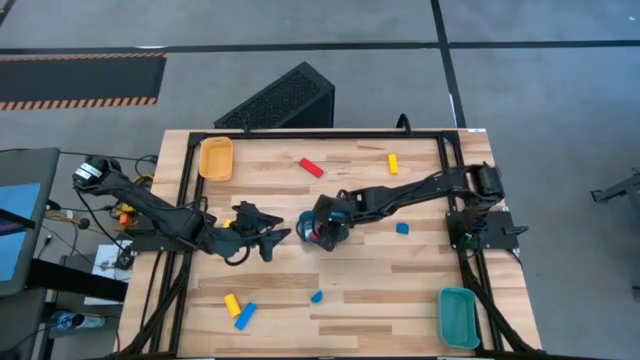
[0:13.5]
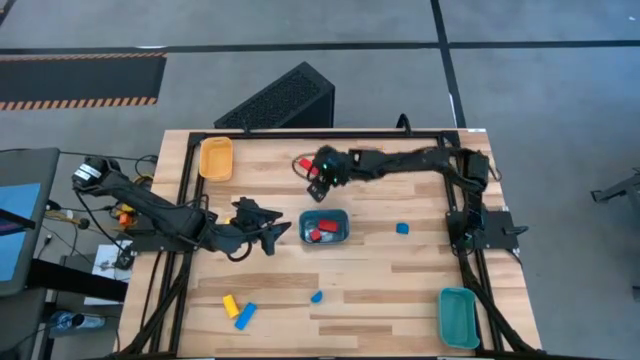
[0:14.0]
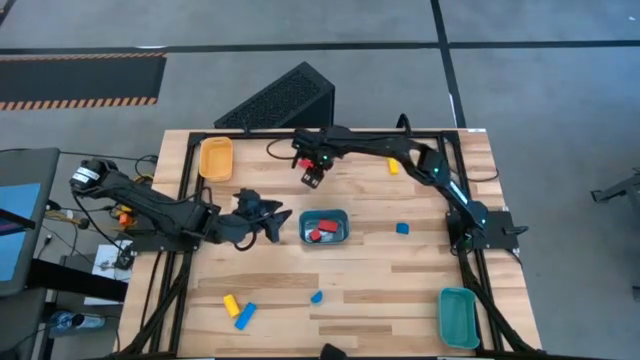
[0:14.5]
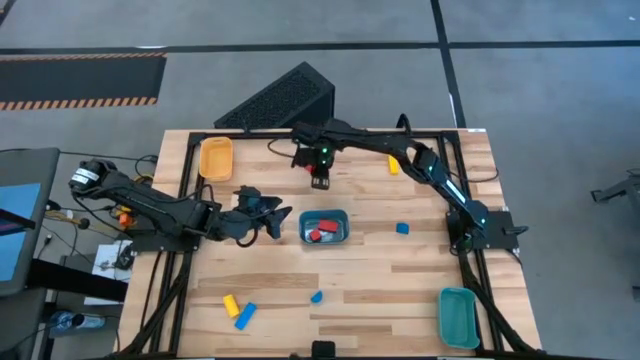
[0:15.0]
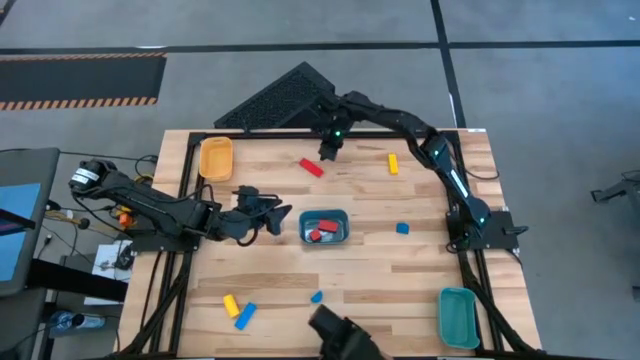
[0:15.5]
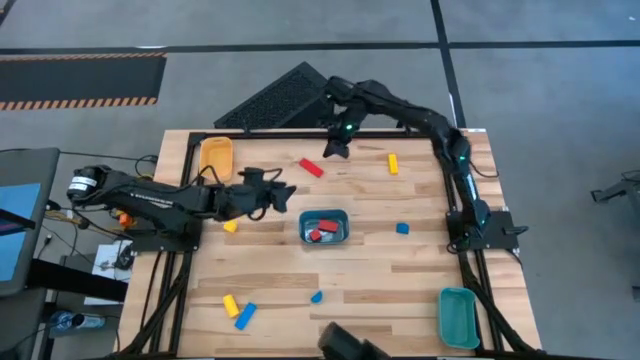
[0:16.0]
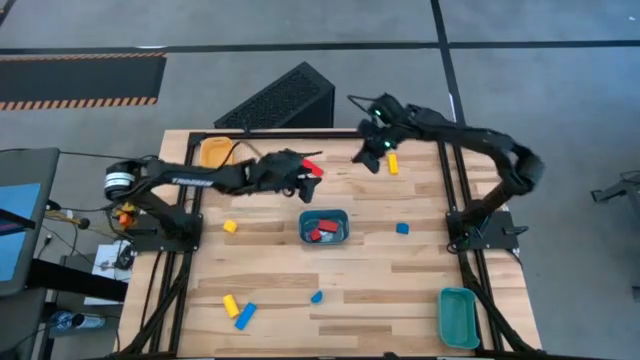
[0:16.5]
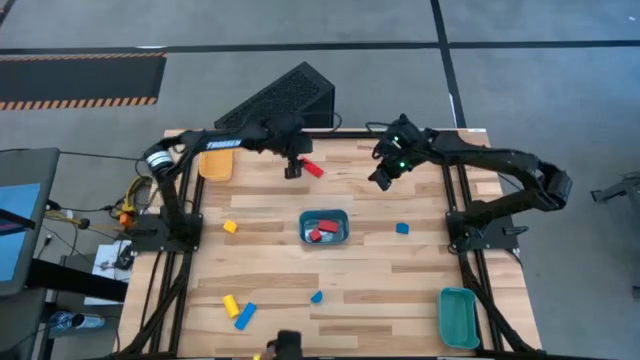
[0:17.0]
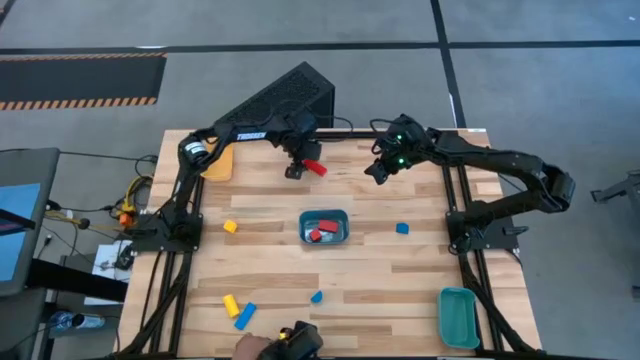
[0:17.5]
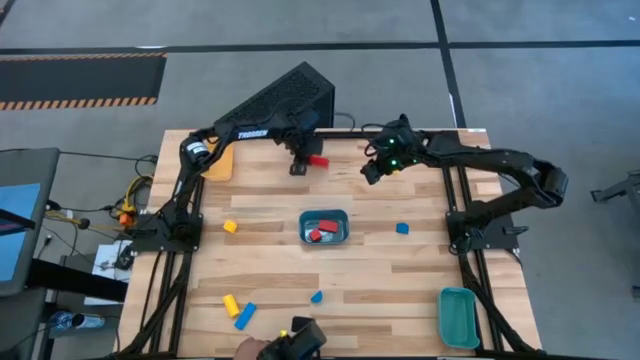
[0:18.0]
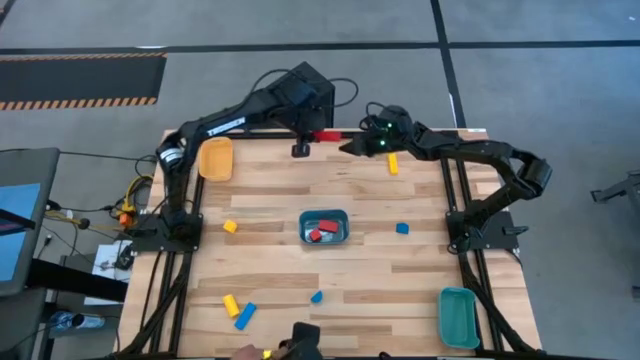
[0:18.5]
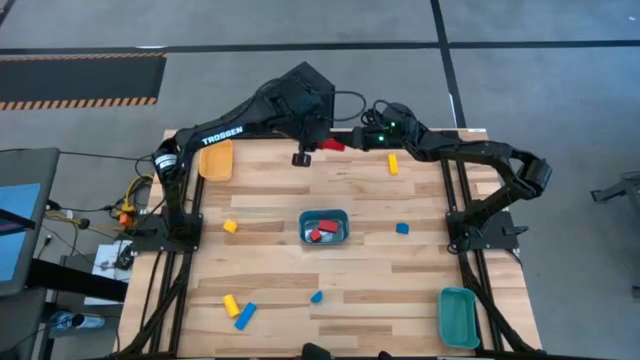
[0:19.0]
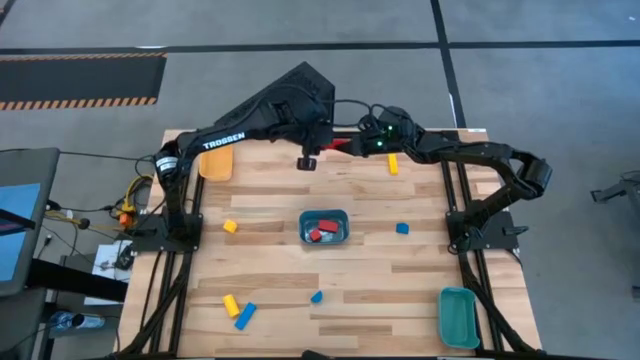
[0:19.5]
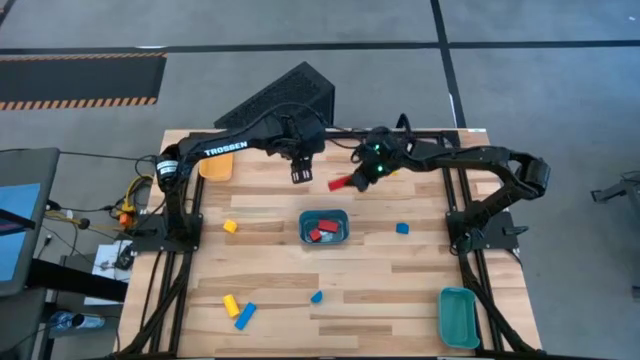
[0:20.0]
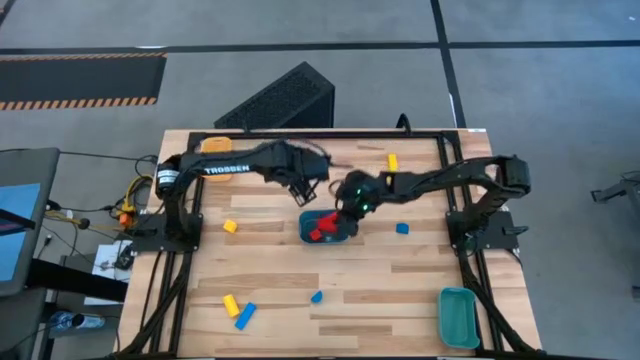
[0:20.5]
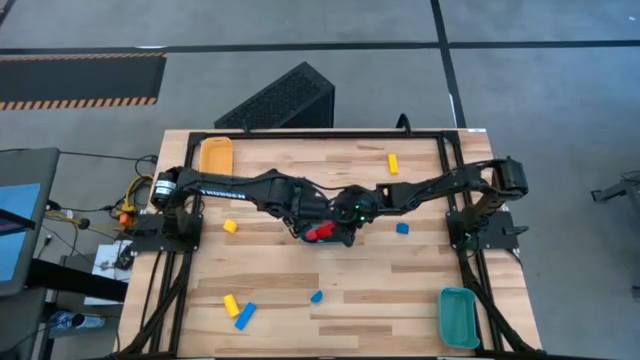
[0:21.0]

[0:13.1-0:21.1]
Task: Sort & place blocks by color
Put the red block into the blue bin

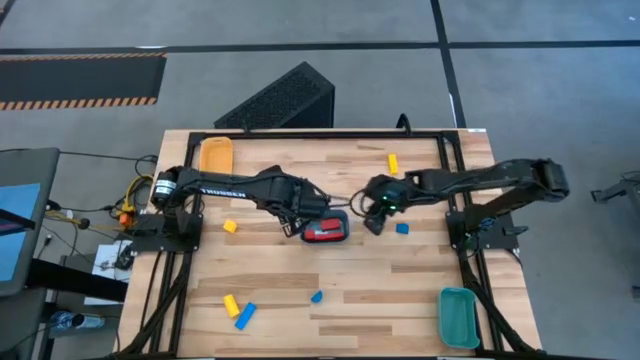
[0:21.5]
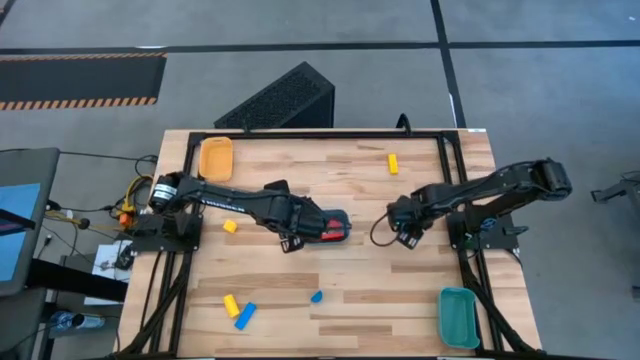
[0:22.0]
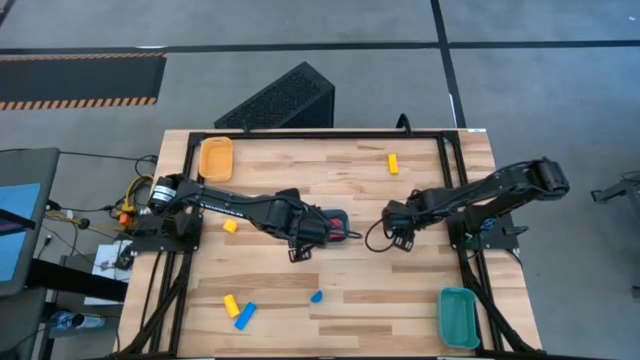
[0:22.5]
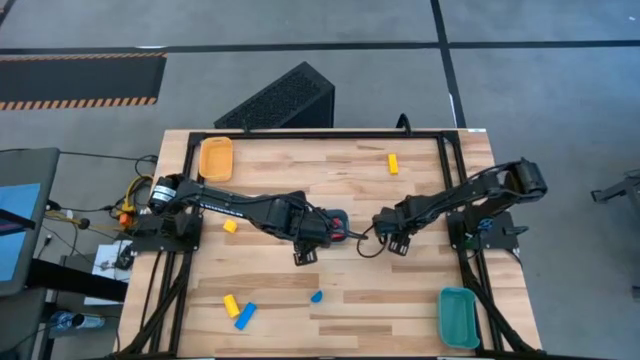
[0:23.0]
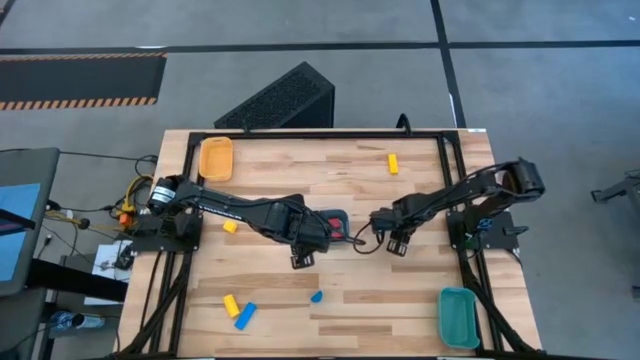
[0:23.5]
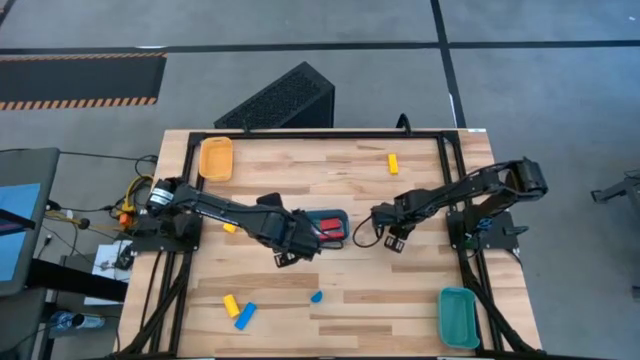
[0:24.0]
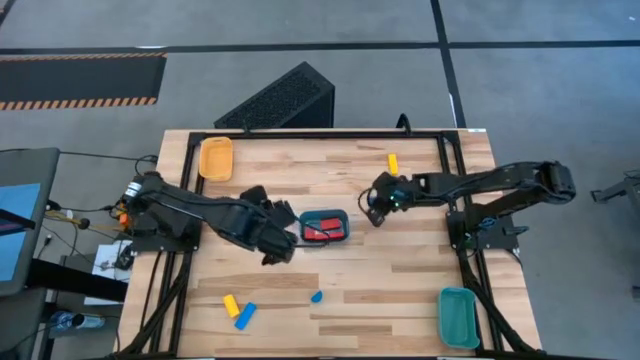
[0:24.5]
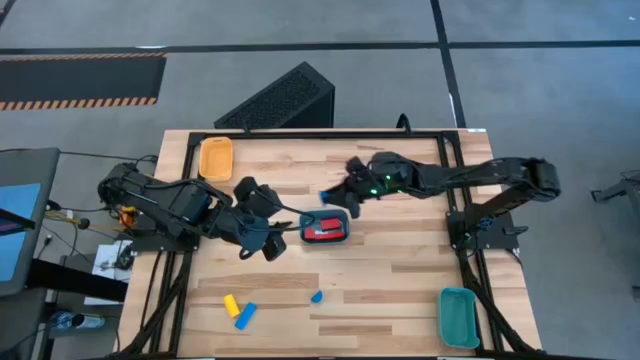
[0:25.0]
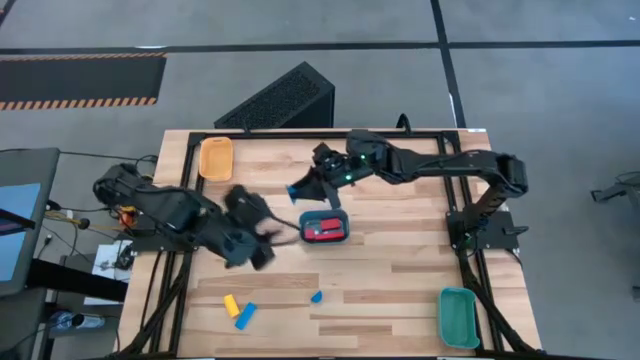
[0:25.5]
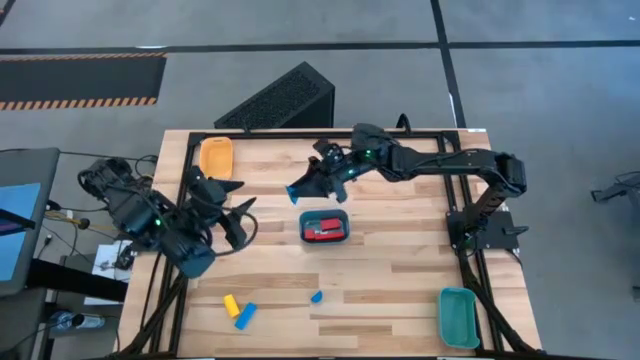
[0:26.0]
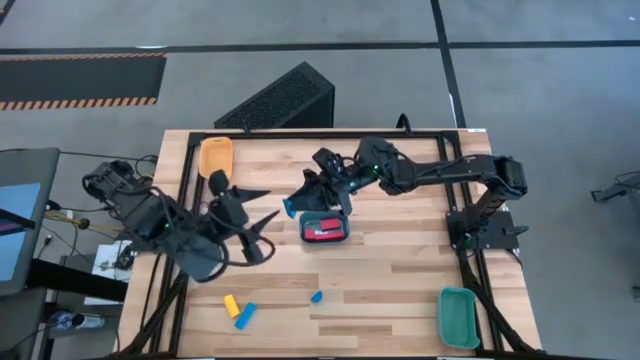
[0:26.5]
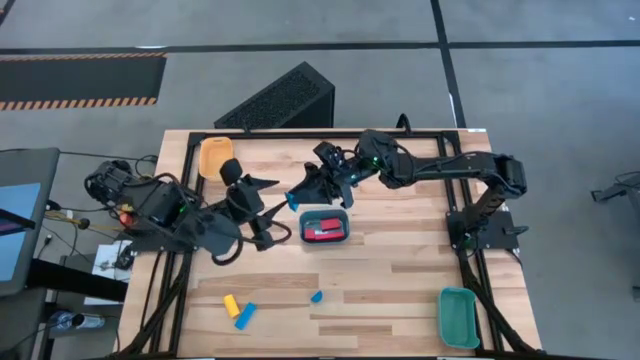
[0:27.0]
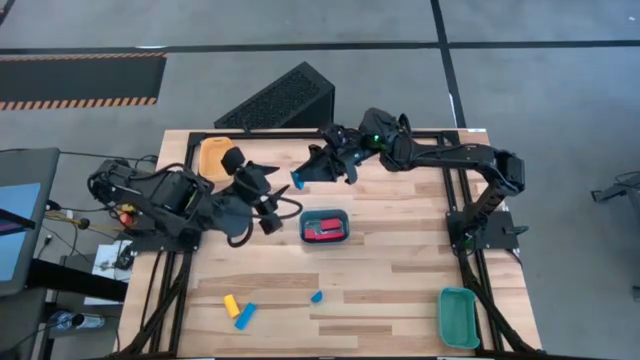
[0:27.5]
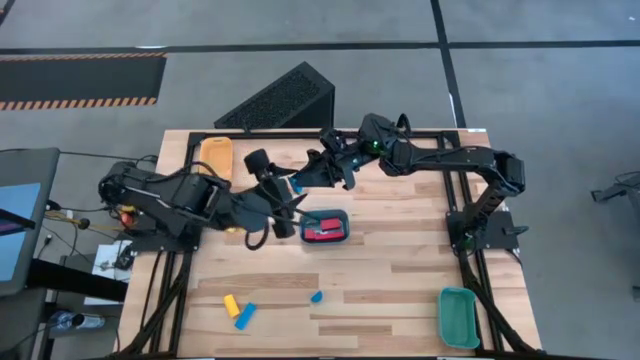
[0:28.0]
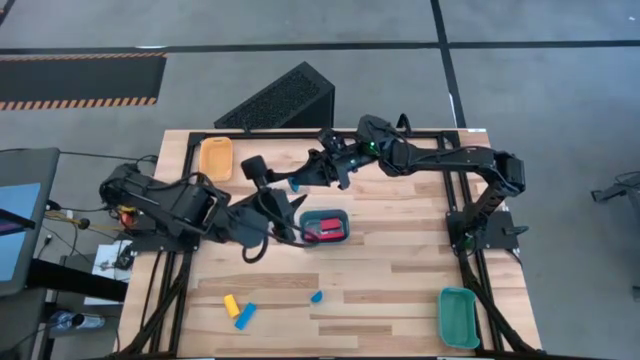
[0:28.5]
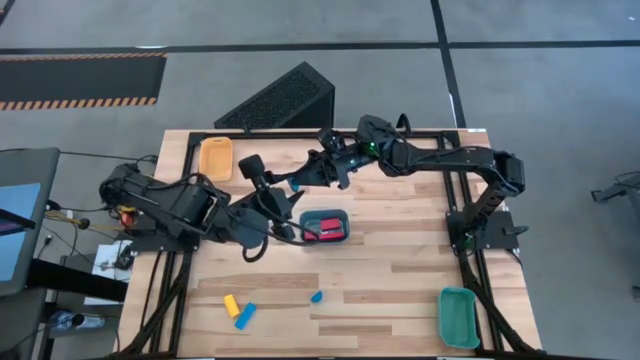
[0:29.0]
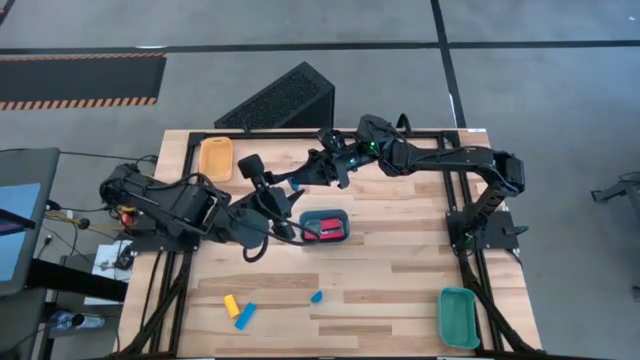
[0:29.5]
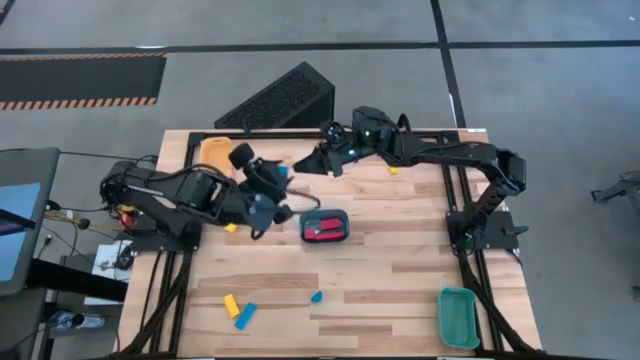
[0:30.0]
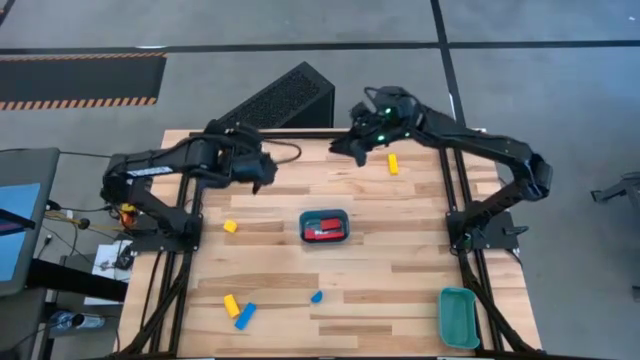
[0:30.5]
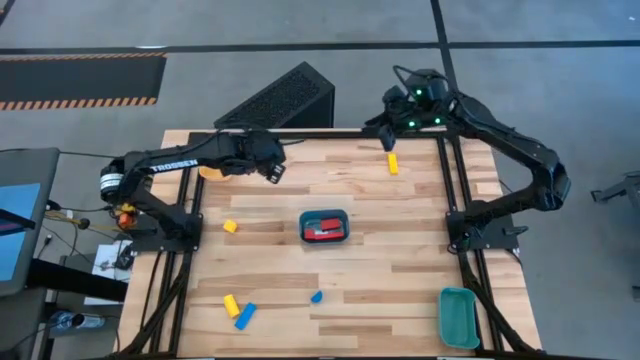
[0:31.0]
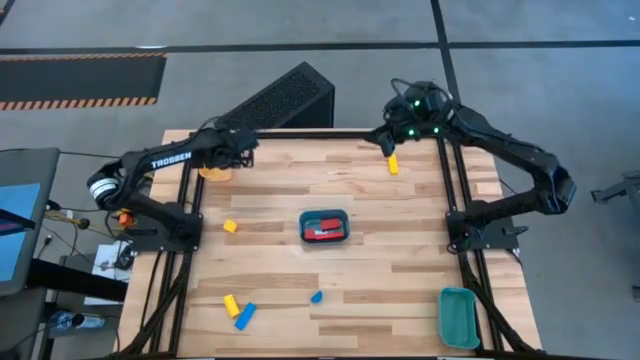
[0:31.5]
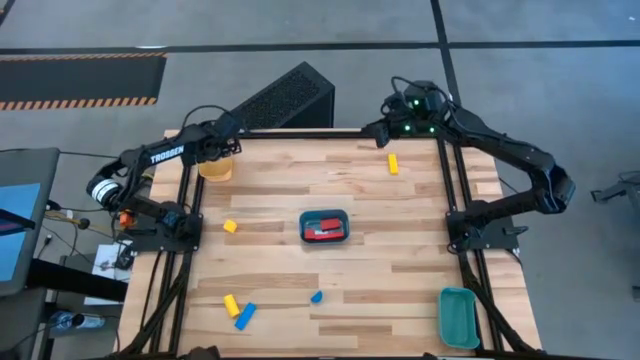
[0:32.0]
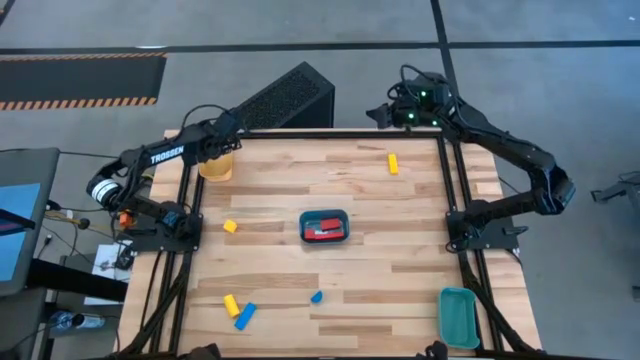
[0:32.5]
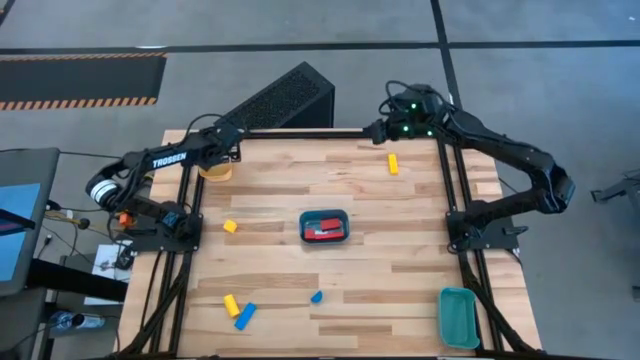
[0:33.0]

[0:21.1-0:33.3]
Put the top right blue block into the yellow bin

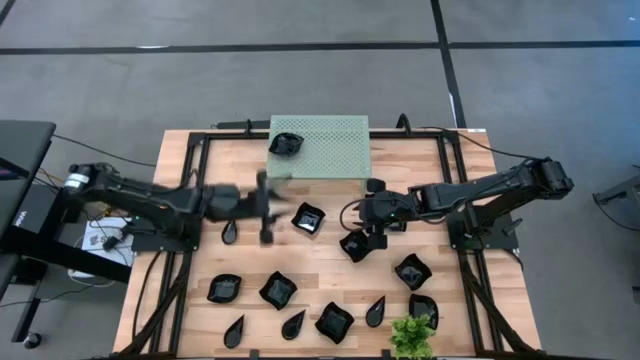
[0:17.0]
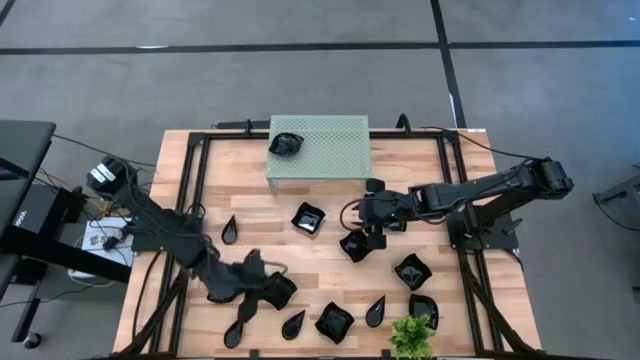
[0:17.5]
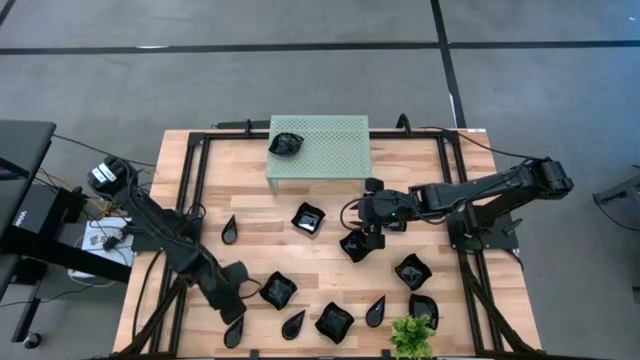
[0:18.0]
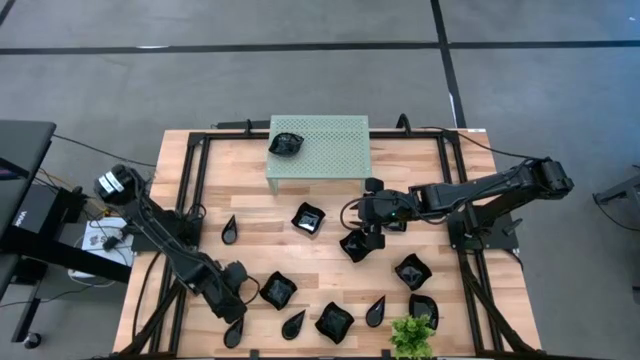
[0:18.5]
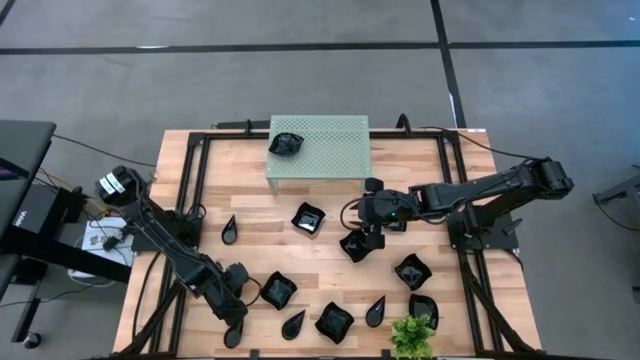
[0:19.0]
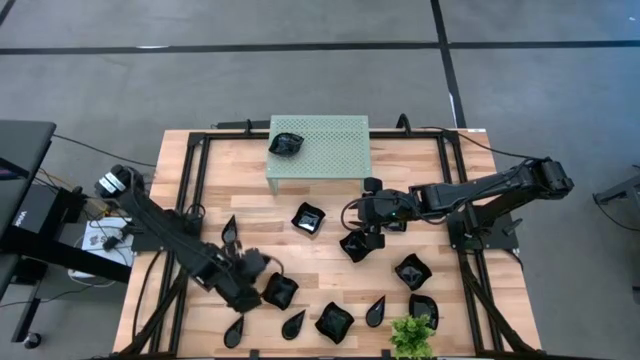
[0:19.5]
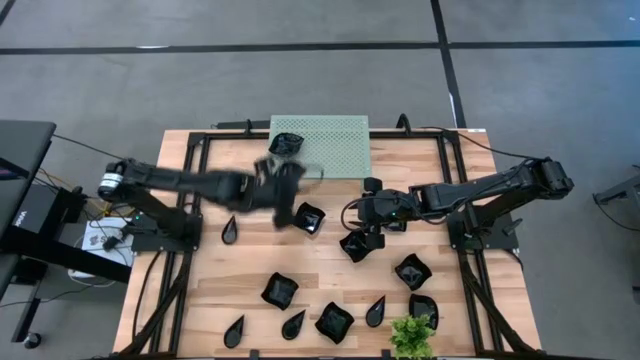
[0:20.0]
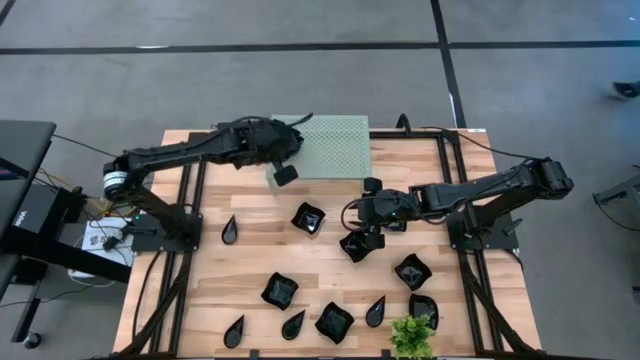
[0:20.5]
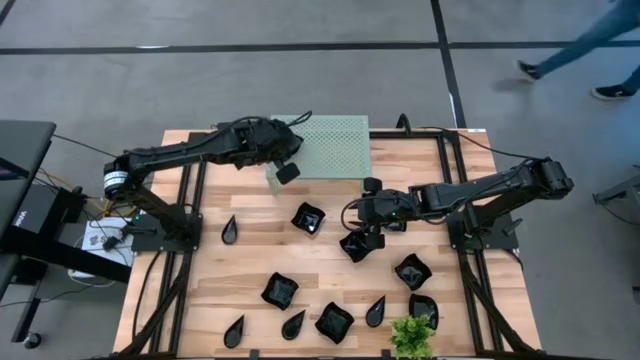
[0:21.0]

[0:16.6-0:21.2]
Task: Pick & Place Mini shaped plates
Stack the leaf-shaped plate on top of the other leaf-shaped plates on the shelf
